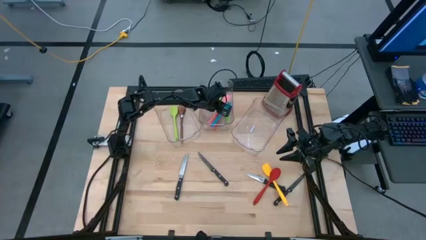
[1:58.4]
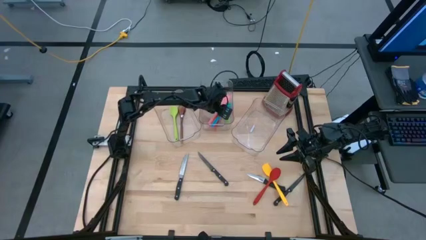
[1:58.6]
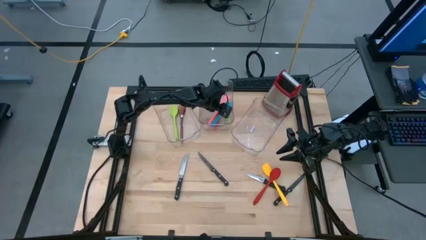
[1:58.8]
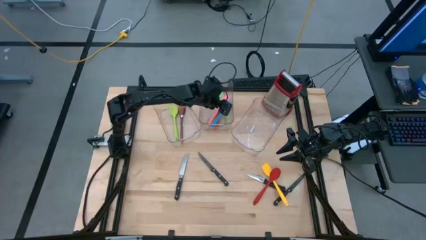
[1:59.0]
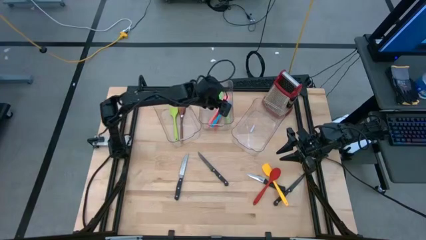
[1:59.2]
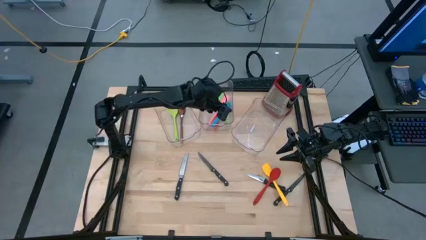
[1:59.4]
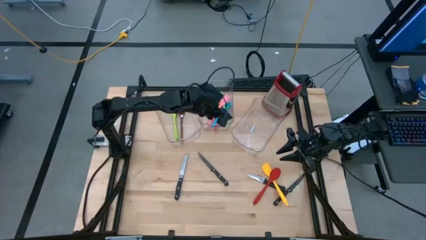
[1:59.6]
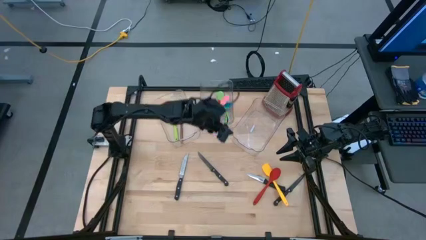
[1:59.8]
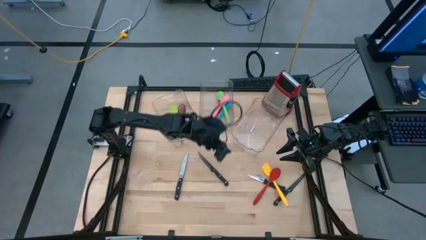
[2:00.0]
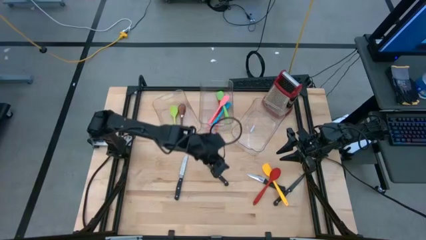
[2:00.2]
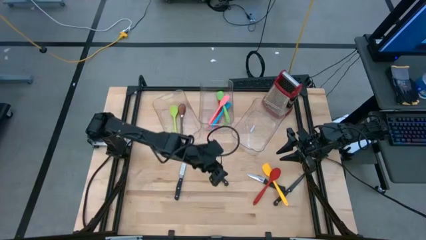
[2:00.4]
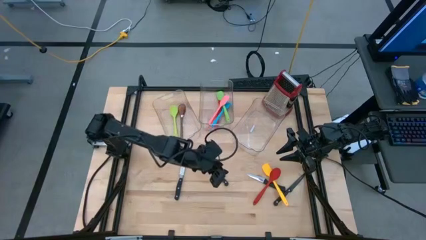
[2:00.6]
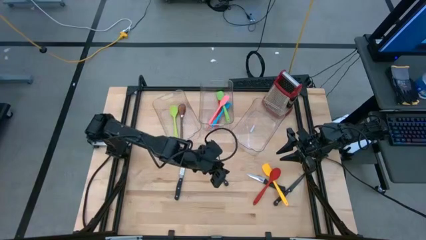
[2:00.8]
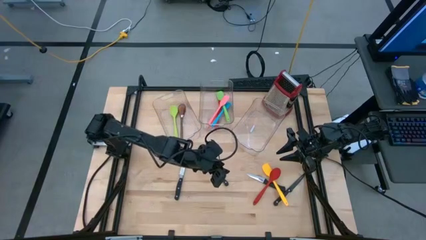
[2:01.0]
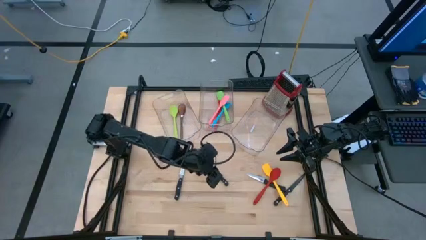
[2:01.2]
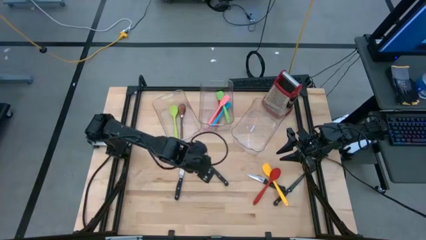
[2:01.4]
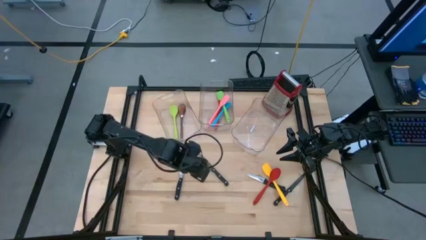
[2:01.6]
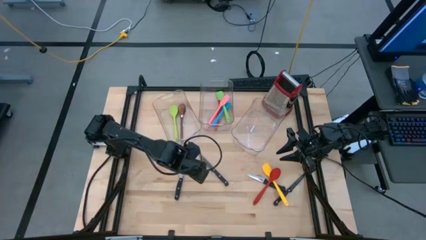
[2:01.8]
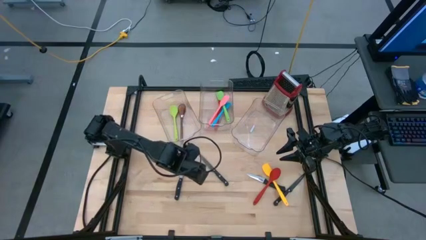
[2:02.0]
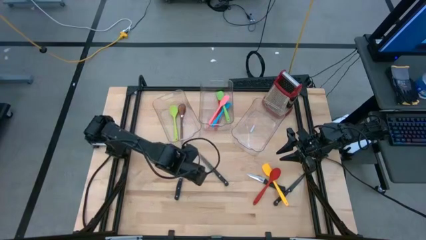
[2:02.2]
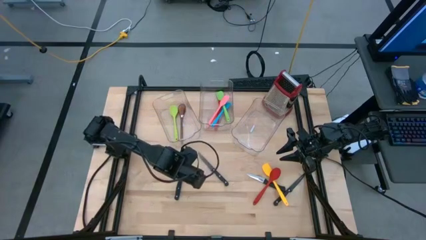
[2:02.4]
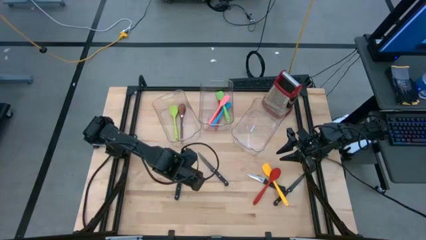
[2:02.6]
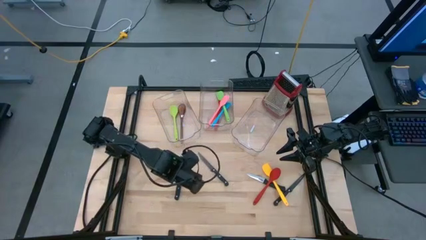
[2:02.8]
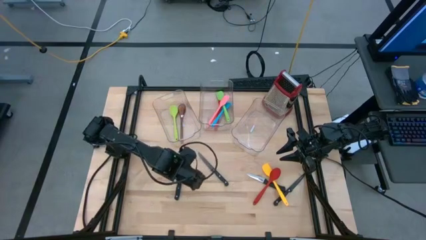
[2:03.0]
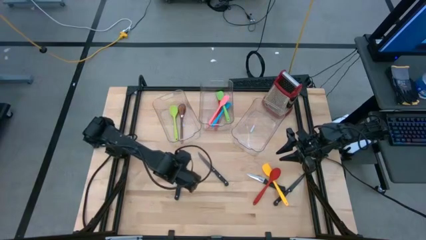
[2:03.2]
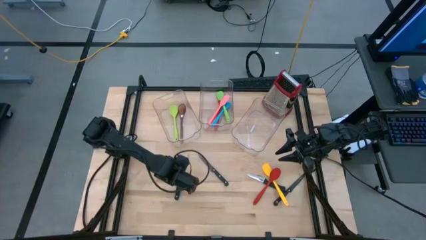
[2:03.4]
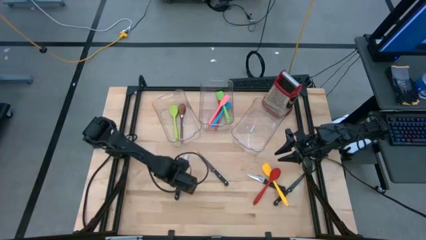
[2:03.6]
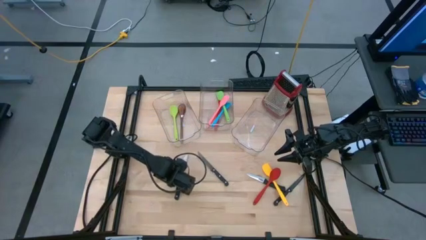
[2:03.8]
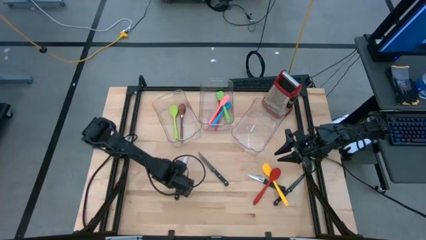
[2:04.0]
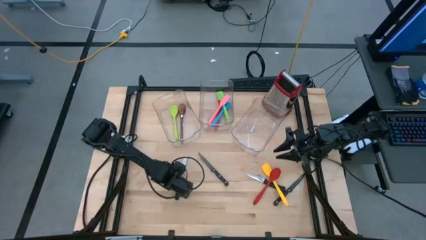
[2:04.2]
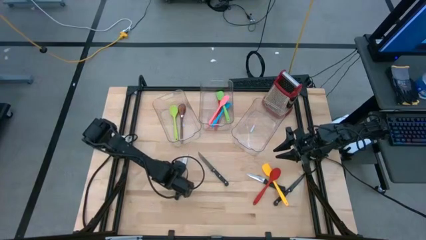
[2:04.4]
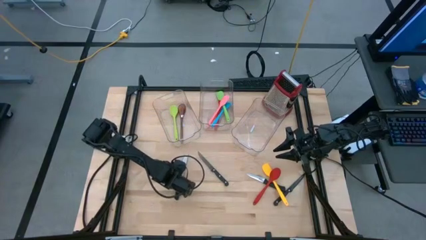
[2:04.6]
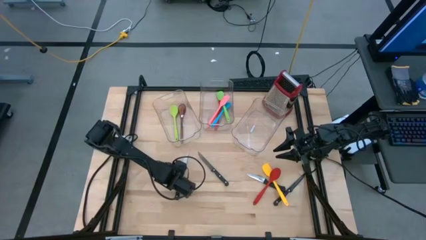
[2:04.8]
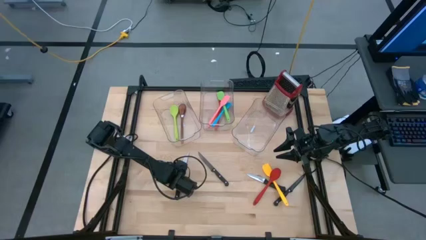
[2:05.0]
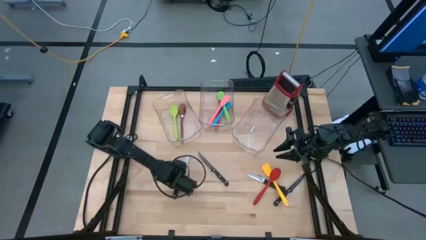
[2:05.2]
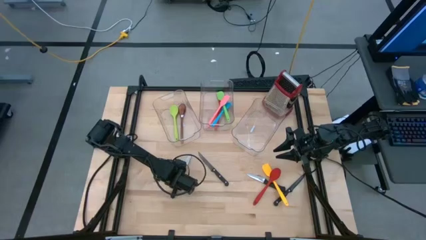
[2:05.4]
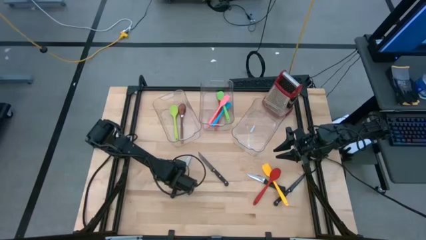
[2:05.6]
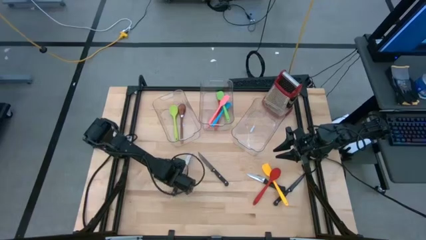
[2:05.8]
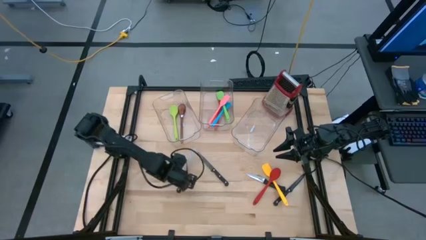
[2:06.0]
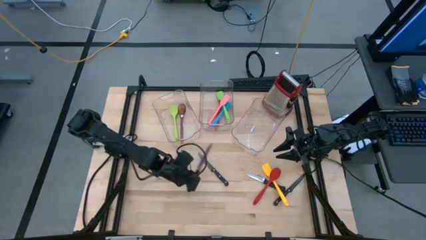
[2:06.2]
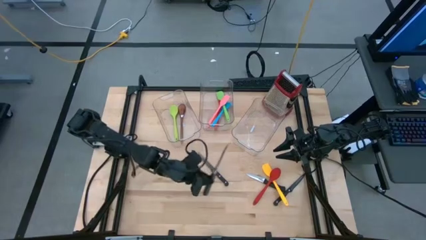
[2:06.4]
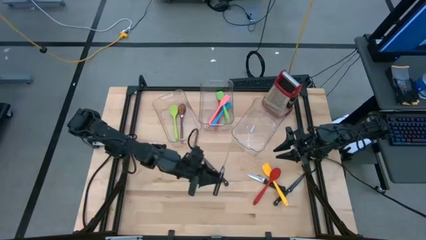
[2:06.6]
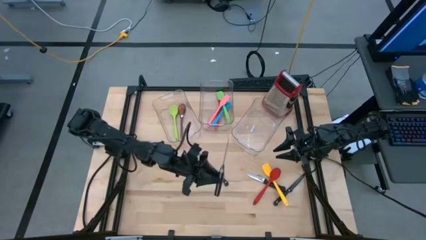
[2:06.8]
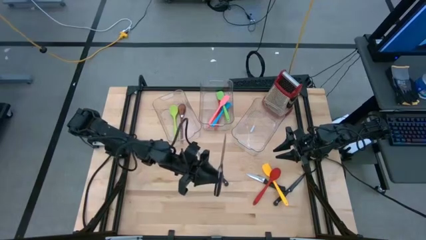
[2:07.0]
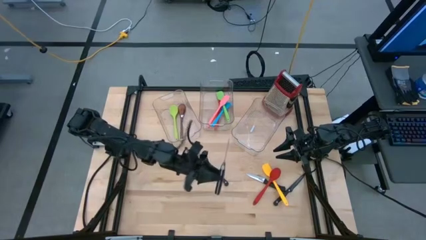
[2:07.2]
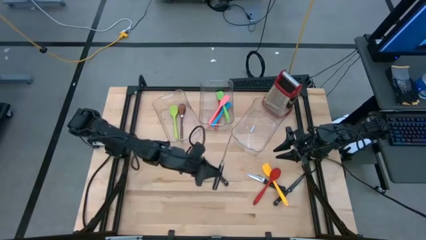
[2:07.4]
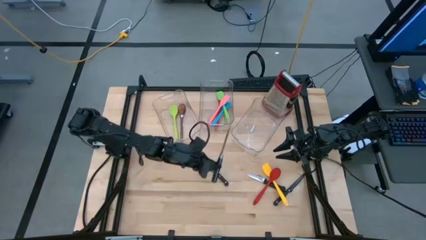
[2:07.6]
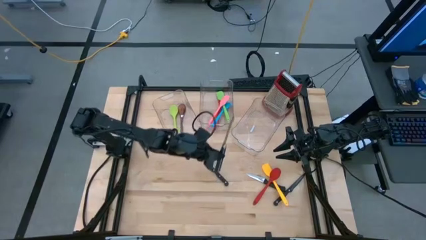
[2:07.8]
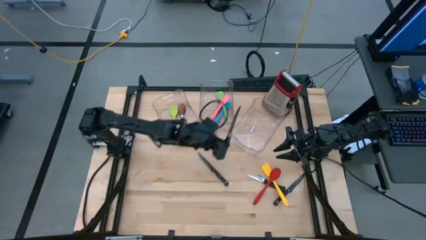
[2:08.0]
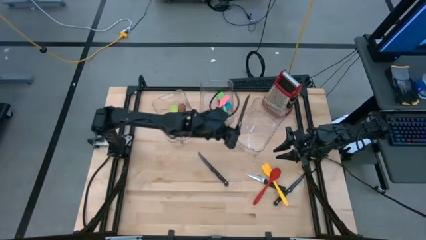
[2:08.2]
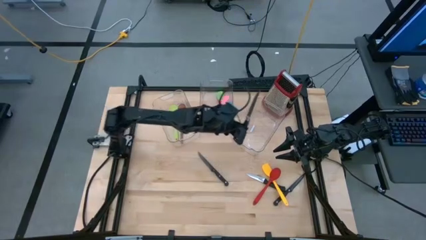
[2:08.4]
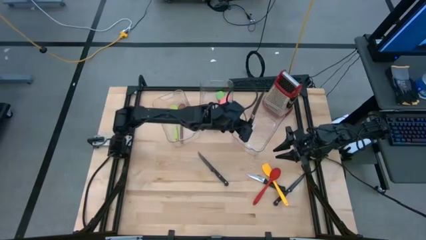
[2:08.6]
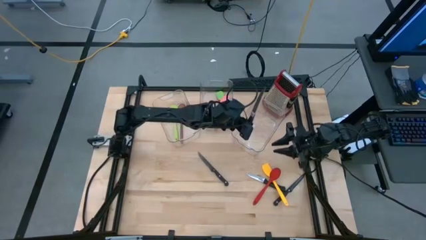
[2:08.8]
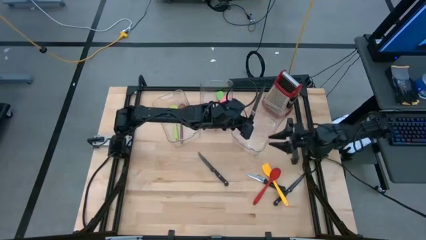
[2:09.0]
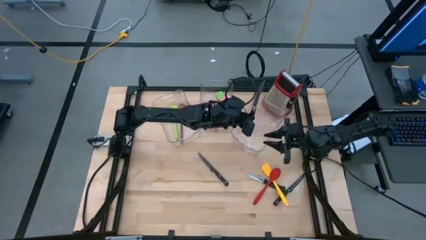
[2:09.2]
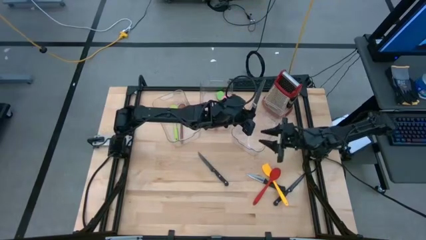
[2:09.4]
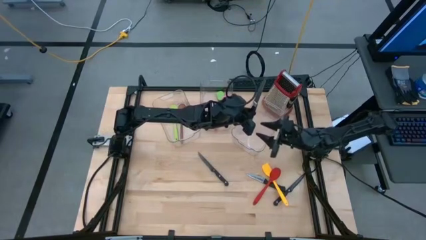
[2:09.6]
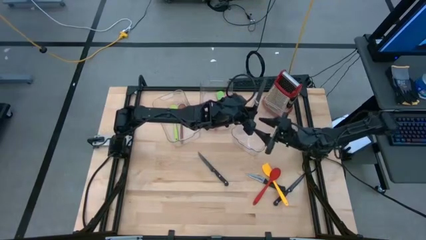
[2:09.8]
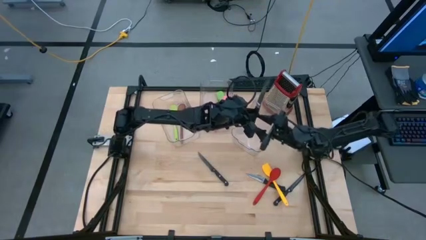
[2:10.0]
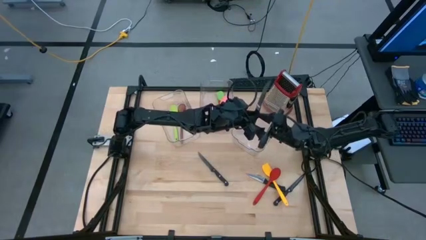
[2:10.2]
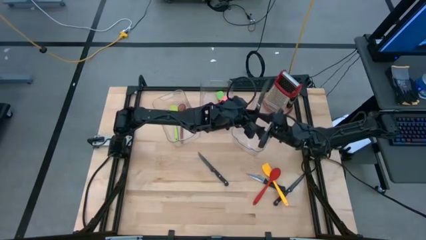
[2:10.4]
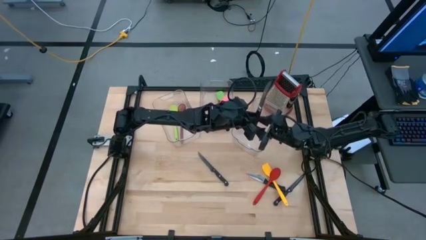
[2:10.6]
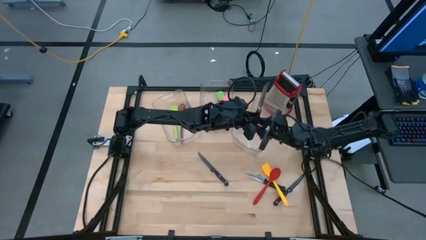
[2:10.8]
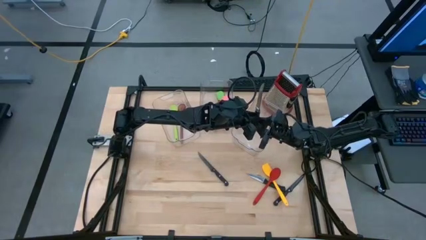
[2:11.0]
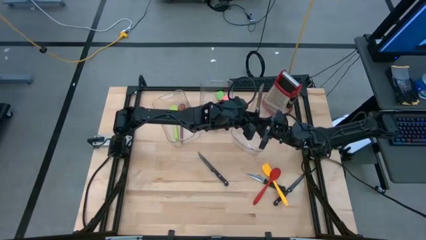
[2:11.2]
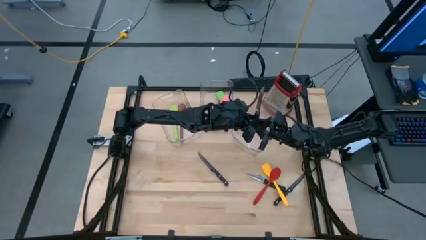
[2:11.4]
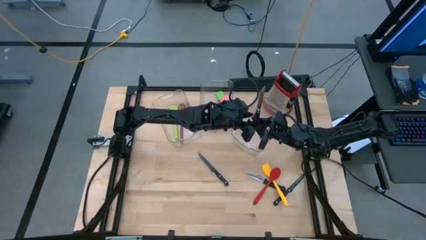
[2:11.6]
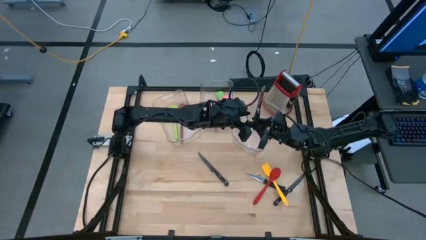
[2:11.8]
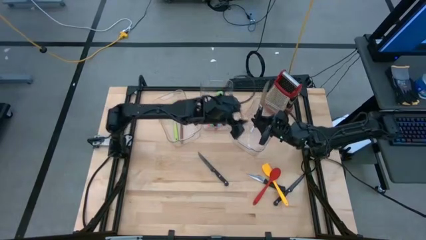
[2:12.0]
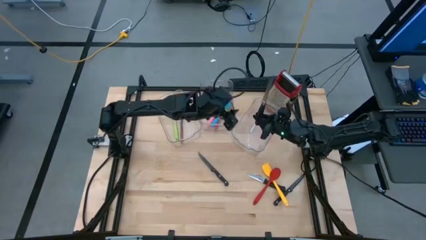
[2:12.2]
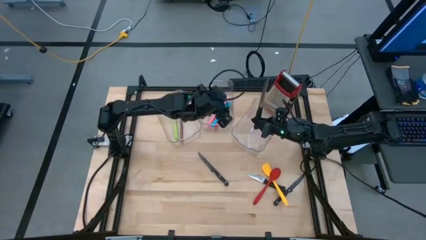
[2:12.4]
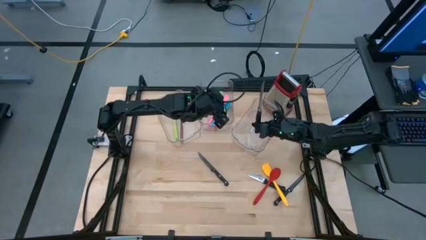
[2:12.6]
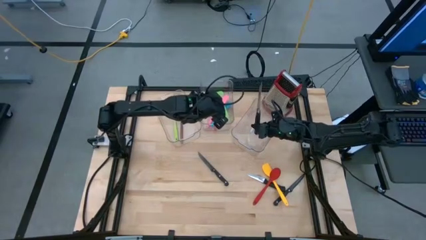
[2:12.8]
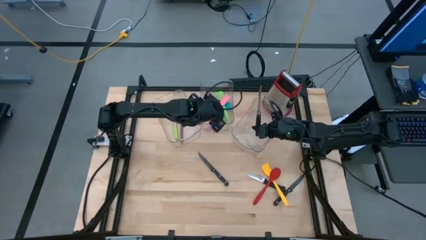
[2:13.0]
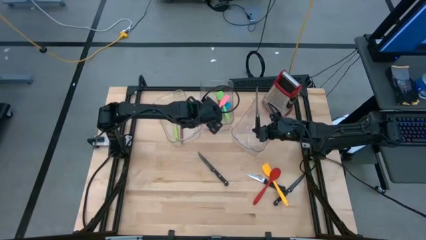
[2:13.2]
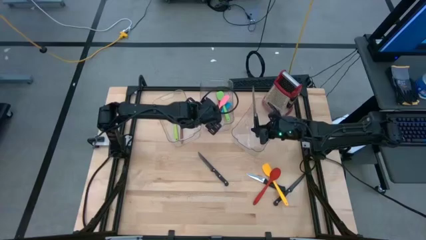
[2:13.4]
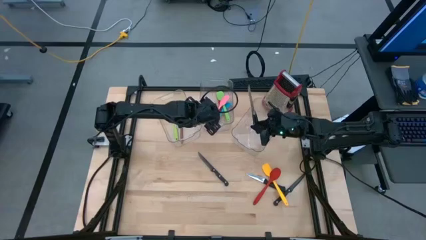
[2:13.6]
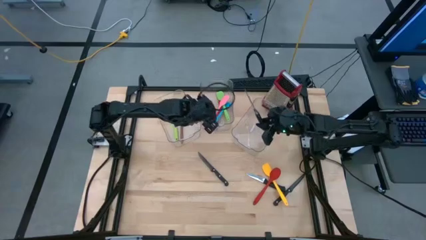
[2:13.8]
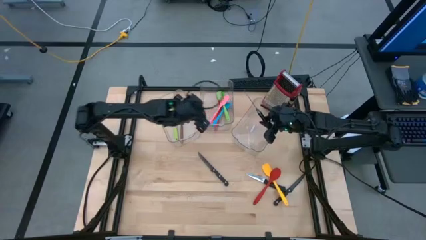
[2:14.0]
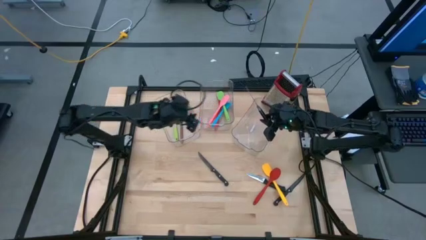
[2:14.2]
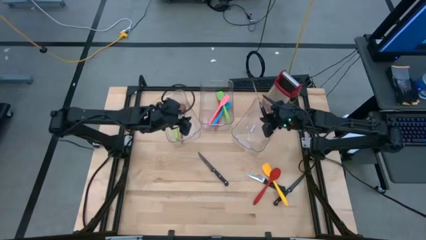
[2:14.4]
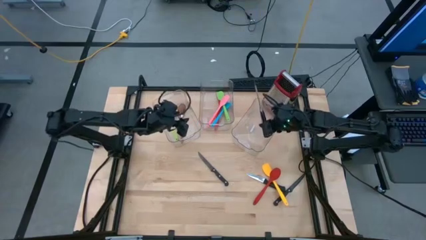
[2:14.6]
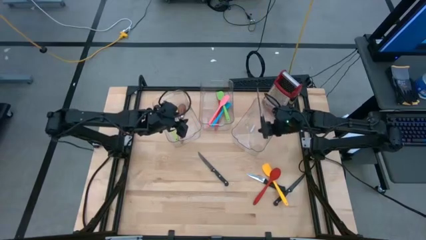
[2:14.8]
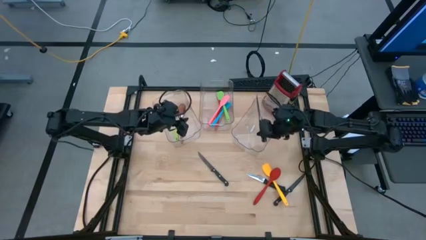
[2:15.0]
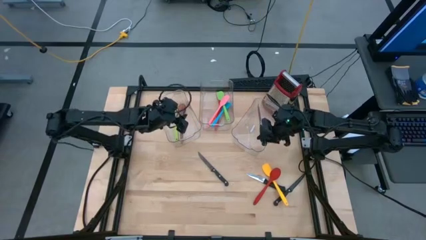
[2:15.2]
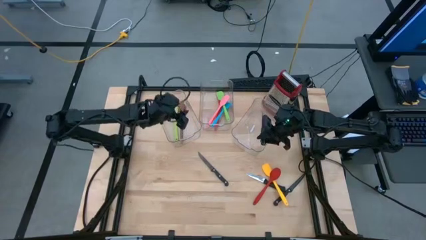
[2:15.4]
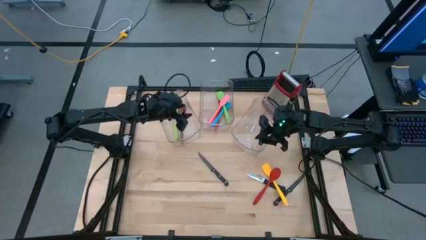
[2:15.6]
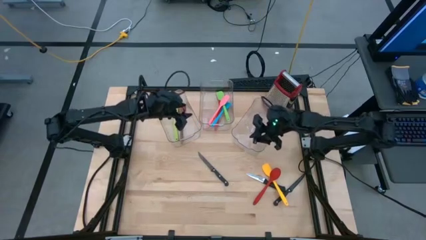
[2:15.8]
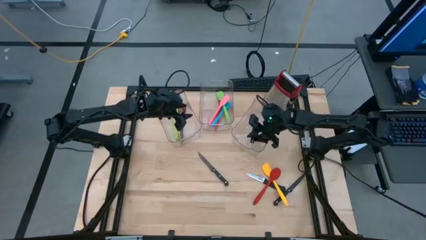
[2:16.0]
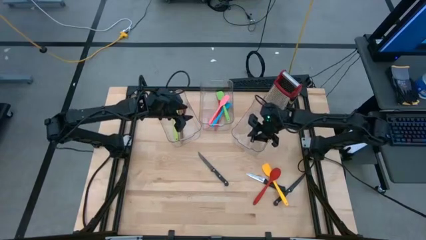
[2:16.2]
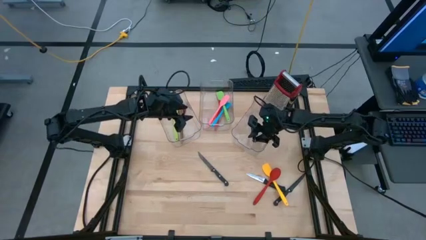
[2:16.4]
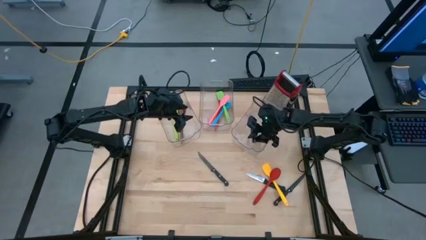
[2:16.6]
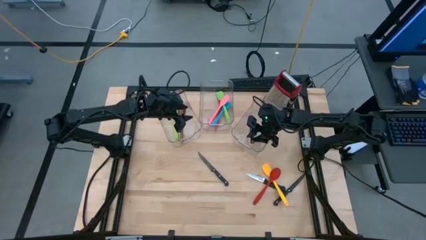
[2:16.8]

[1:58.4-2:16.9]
Task: Pick & Place Kitchen Items
Put the left silver kitchen knife in the right bin
